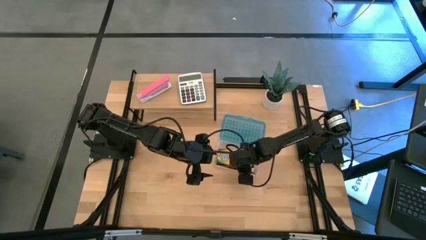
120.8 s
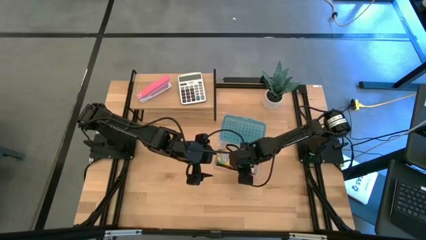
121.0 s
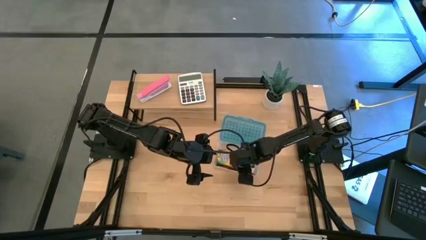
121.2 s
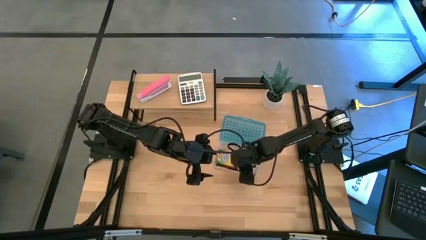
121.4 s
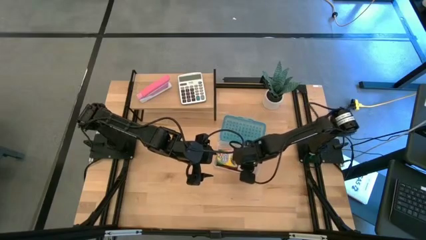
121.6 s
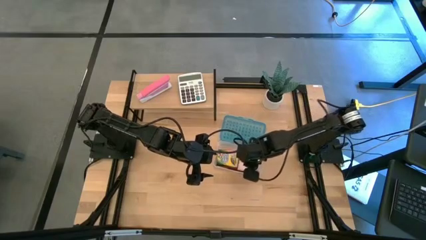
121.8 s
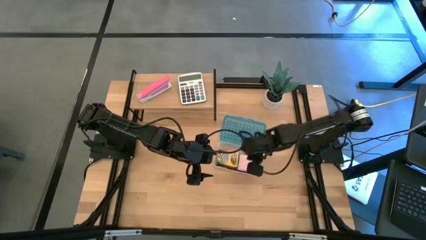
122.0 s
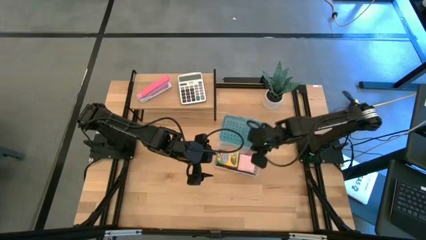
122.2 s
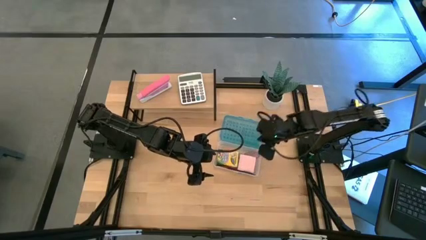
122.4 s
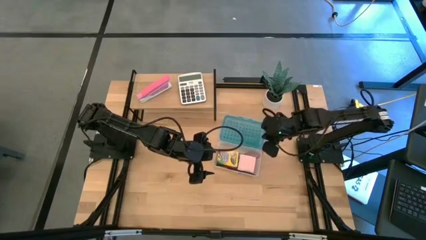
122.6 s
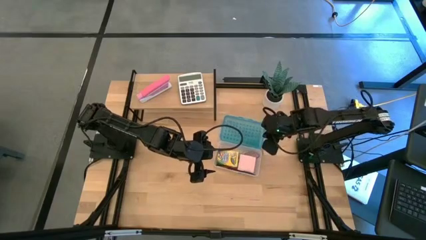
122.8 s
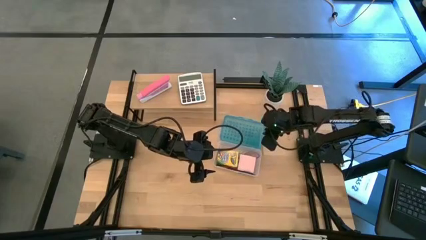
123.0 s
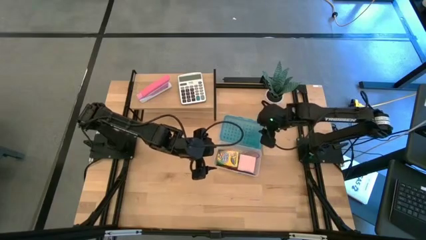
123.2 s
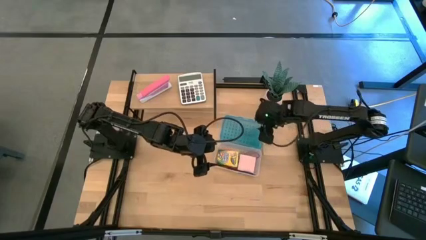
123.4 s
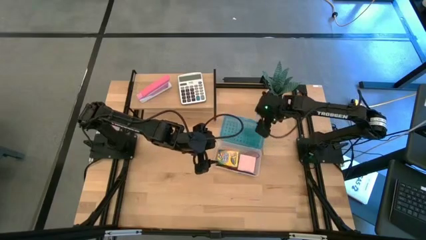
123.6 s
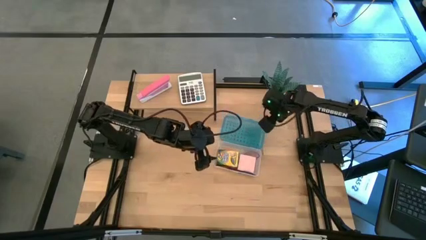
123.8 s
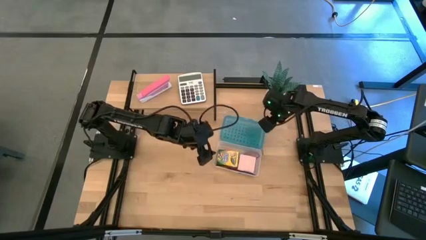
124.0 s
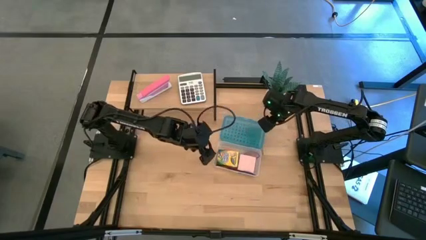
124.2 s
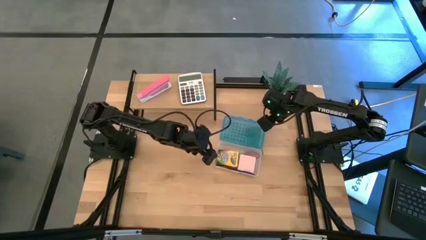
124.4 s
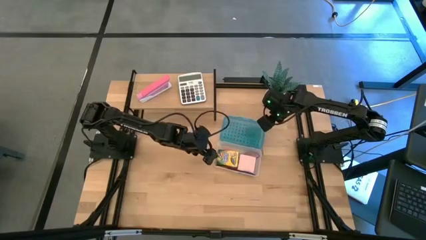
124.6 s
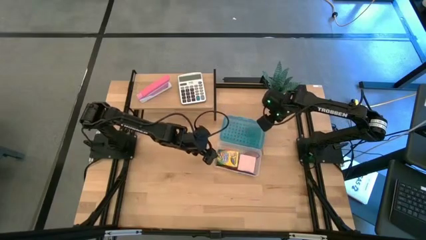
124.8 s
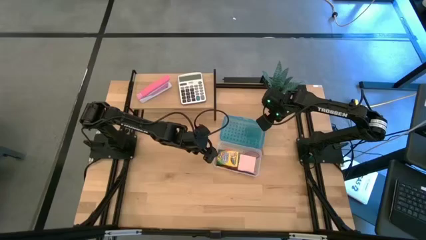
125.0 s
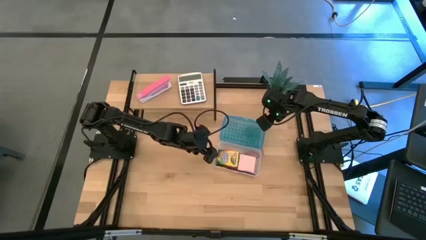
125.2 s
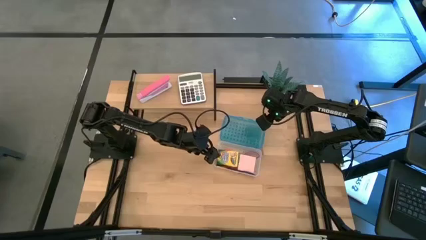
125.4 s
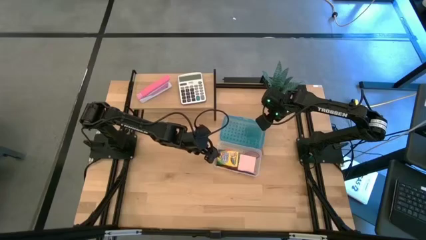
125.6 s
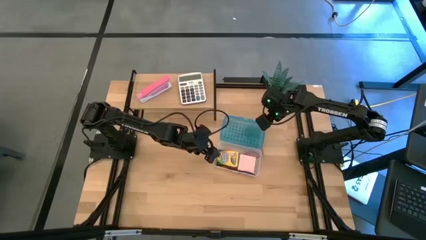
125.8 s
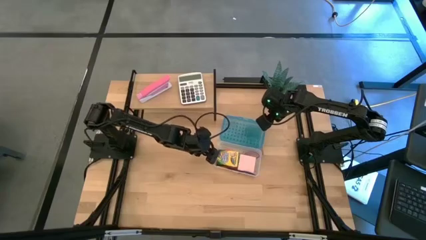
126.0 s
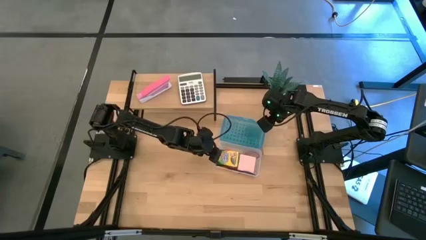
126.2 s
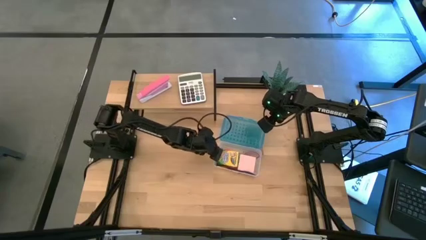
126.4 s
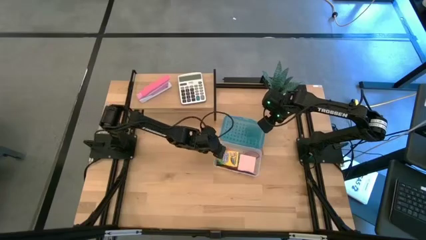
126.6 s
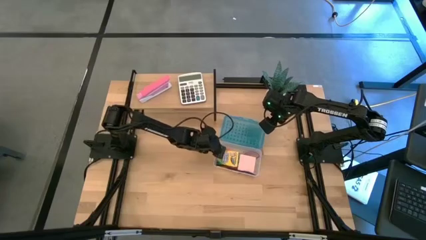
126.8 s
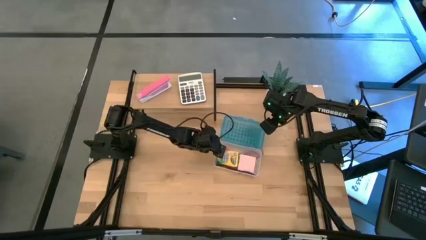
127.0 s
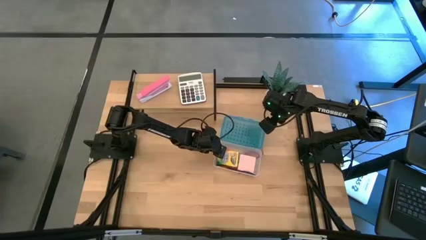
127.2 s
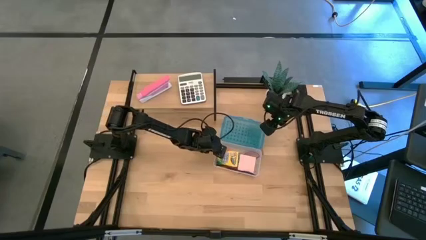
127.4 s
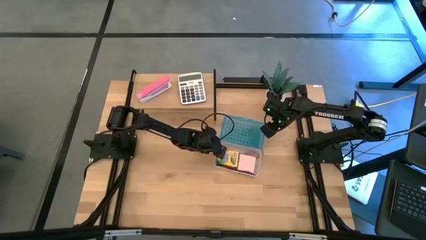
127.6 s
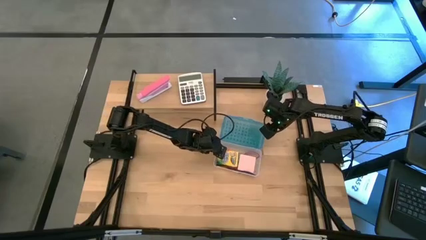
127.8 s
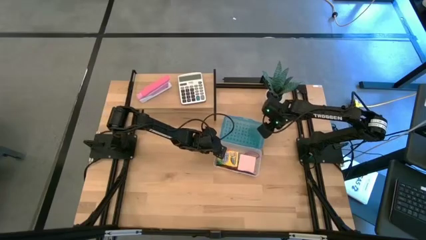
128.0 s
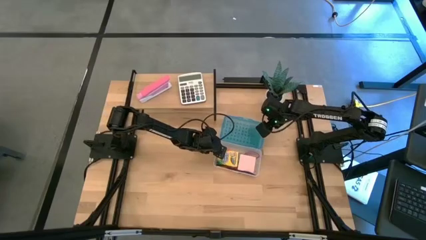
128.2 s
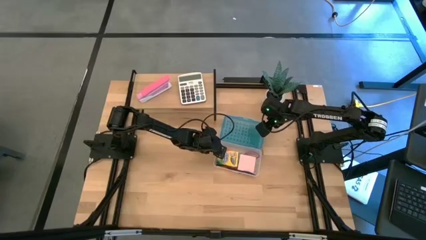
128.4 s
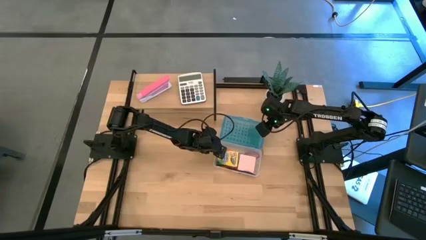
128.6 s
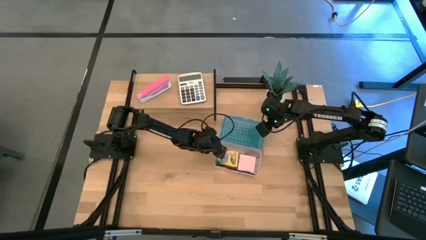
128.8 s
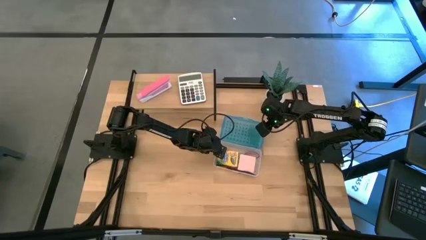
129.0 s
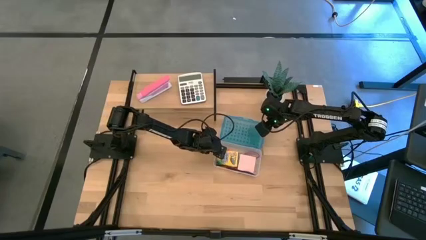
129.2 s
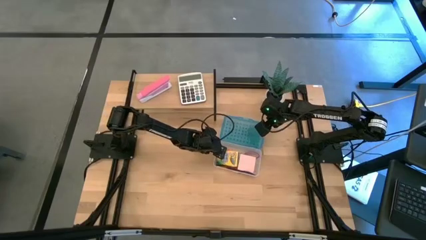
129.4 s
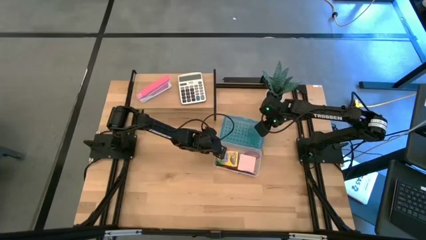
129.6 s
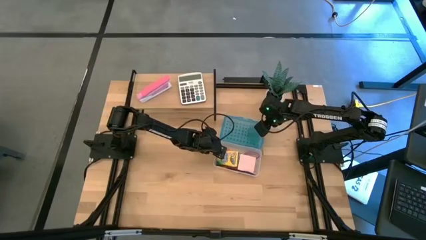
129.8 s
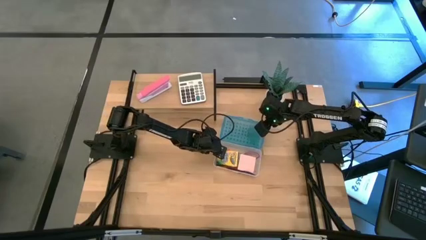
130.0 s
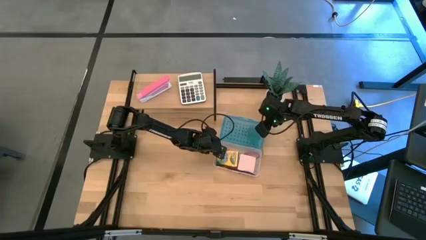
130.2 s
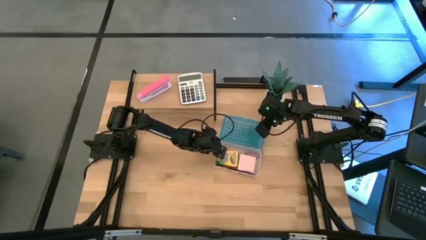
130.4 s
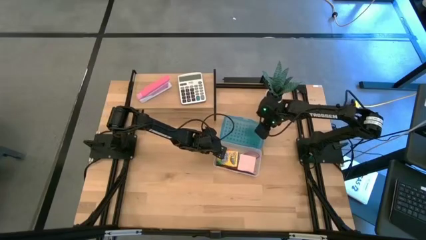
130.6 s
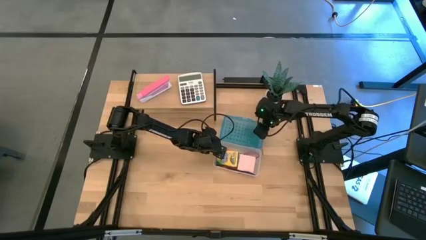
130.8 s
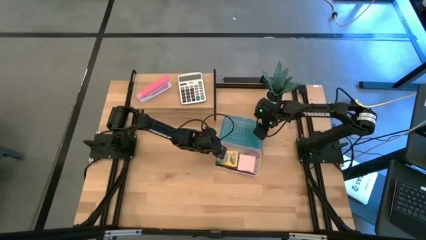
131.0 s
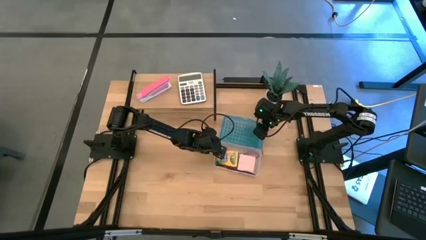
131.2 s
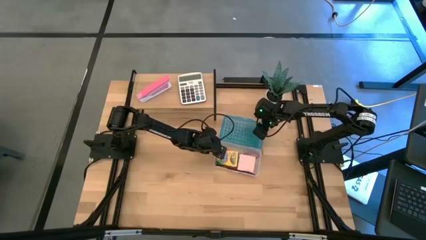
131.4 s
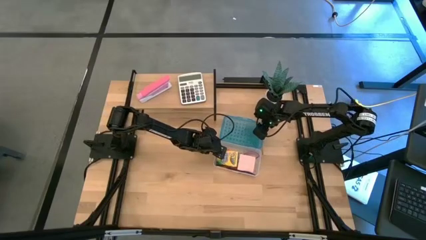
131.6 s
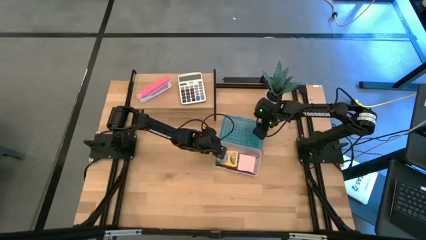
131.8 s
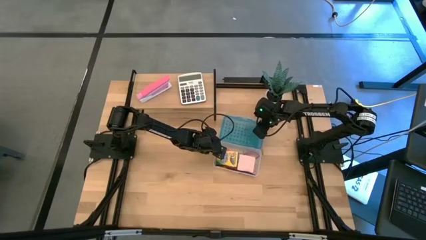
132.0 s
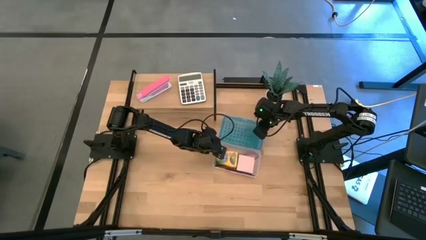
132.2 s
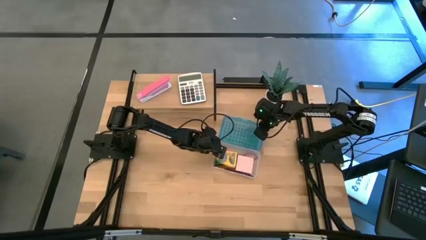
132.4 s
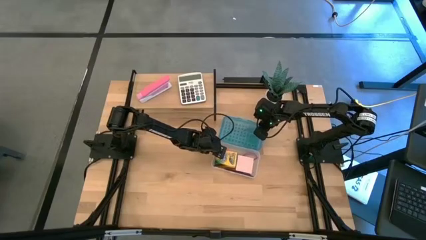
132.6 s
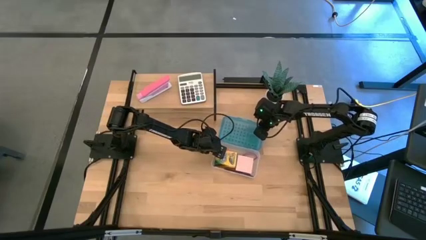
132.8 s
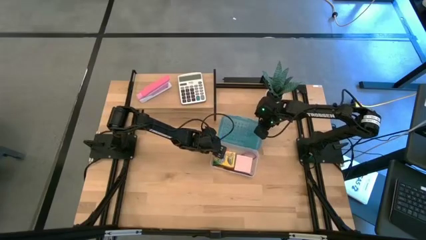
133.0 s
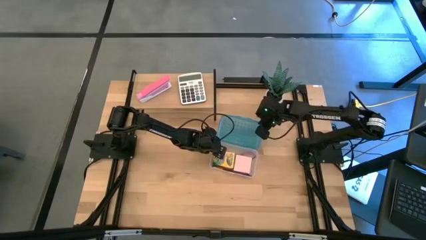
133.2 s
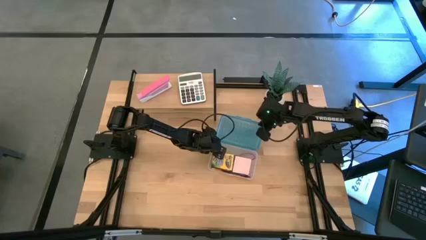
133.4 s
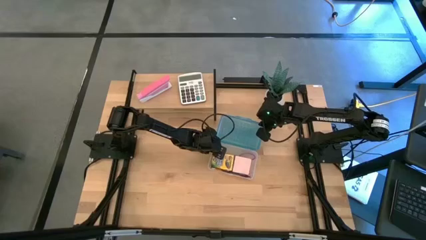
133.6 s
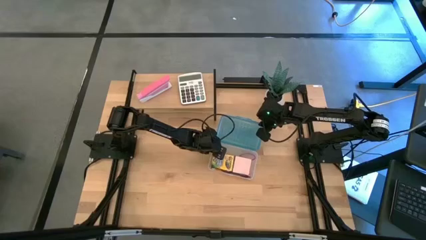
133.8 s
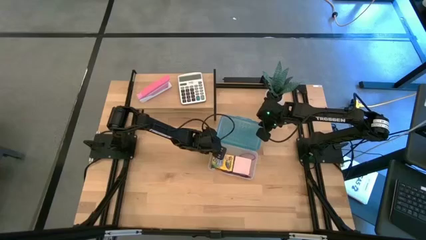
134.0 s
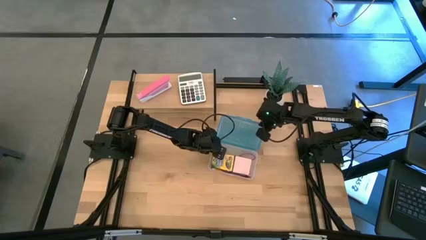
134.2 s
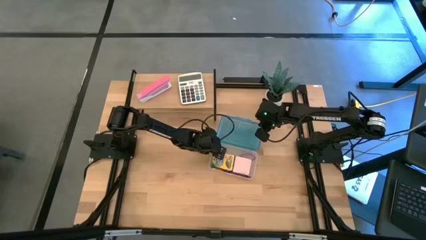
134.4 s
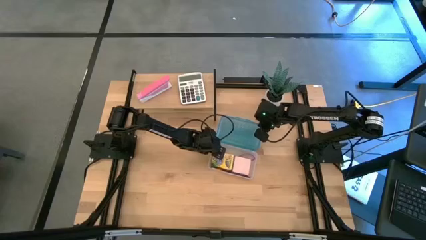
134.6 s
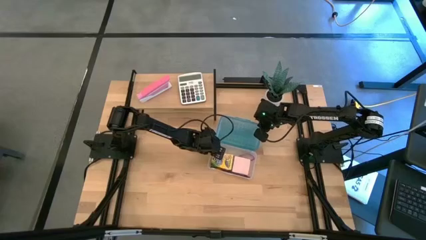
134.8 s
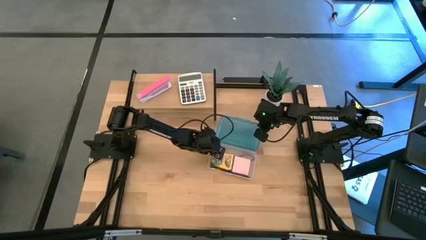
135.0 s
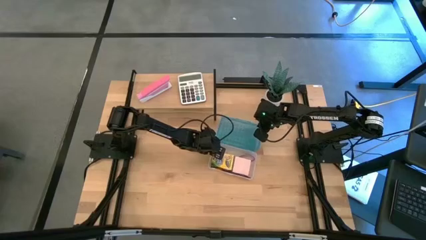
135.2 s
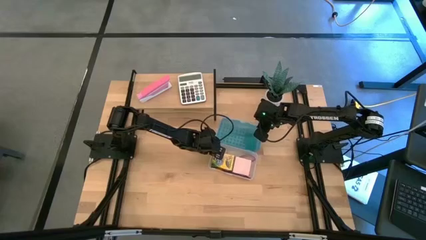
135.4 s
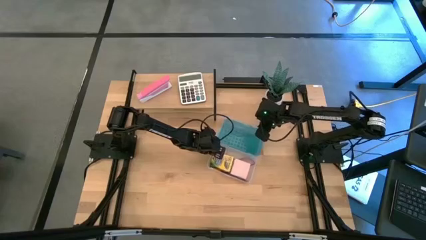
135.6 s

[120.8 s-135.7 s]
Task: Pack school essentials
Close the supply box

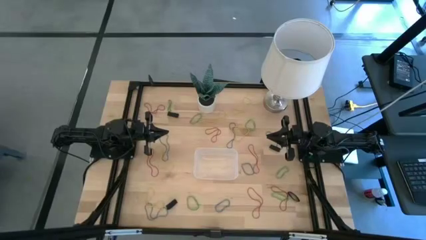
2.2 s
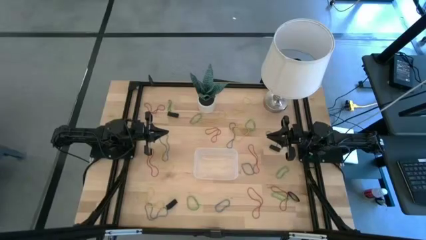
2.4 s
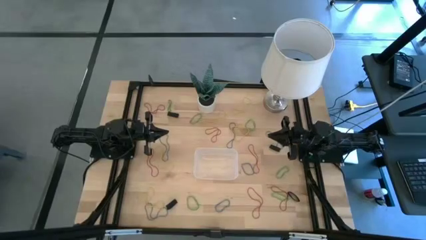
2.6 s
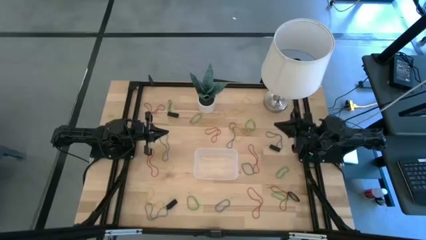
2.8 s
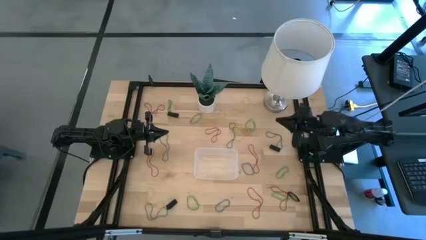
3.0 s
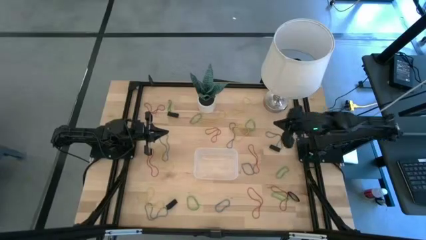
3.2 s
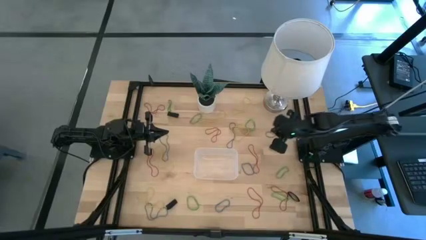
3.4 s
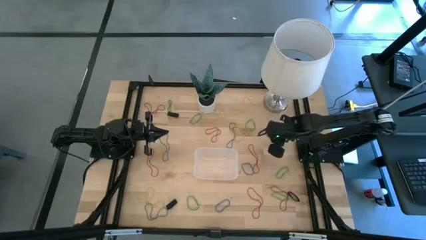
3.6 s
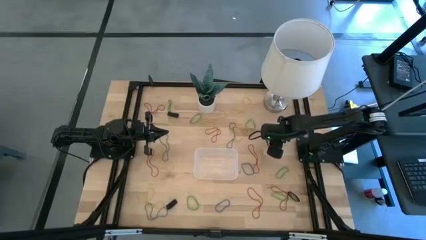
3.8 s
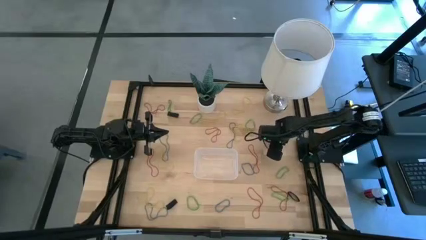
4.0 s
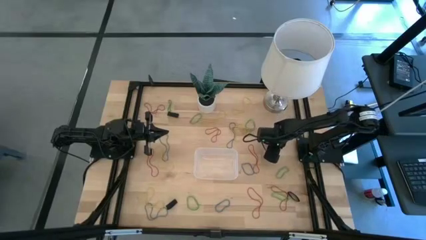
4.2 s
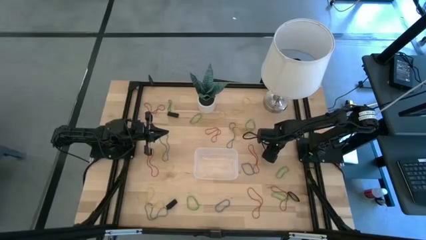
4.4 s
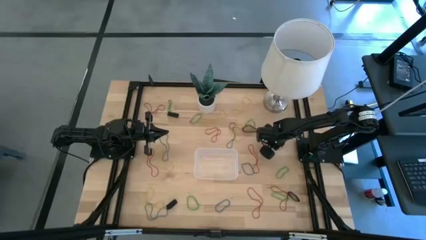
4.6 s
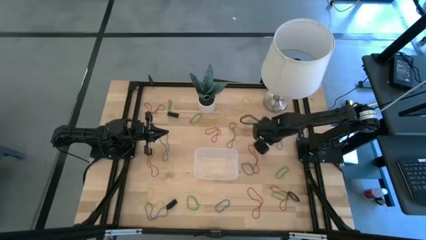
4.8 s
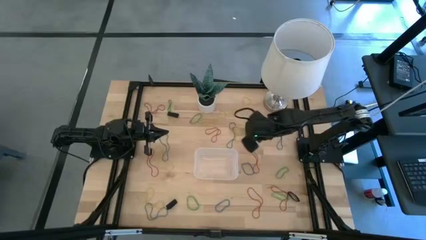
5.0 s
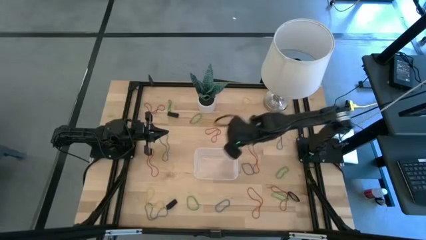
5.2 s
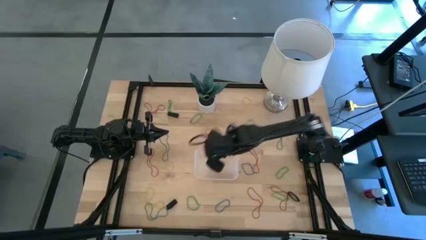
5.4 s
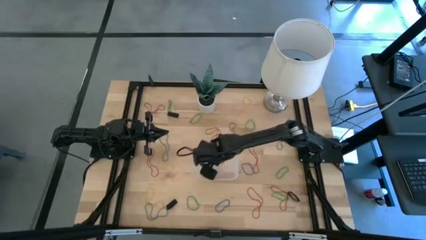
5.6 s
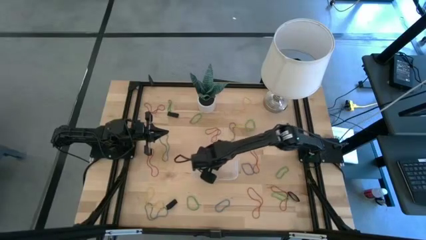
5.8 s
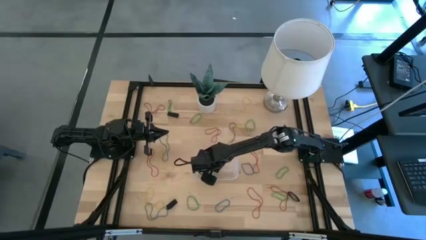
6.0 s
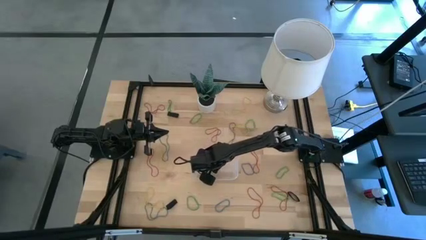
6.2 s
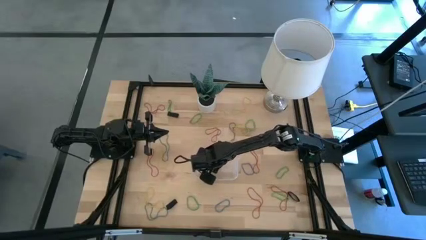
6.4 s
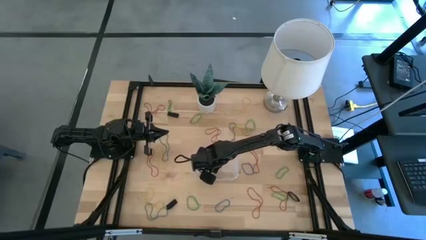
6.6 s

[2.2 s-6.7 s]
Task: Pick and place rubber bands into bin
Put the black rubber band into the transparent bin
